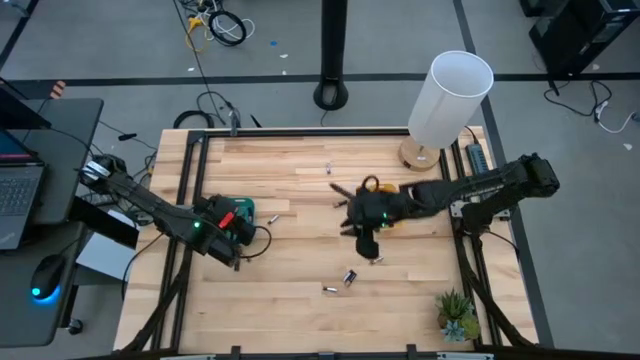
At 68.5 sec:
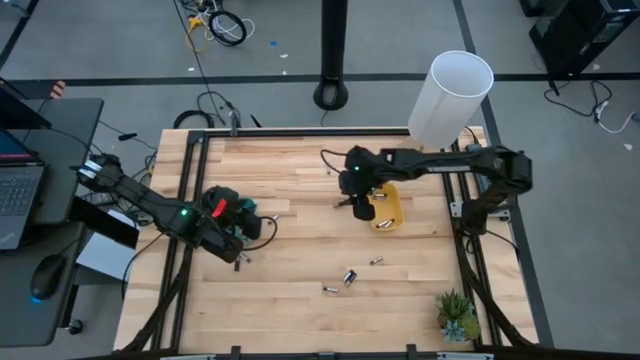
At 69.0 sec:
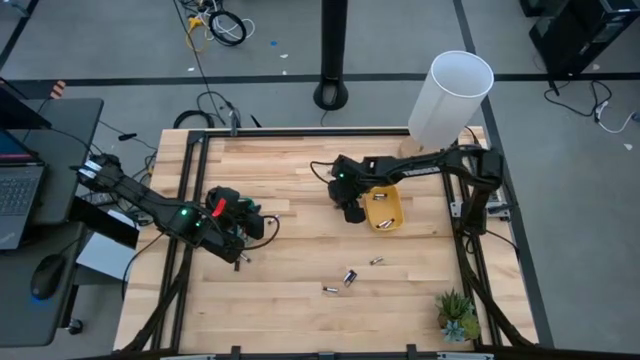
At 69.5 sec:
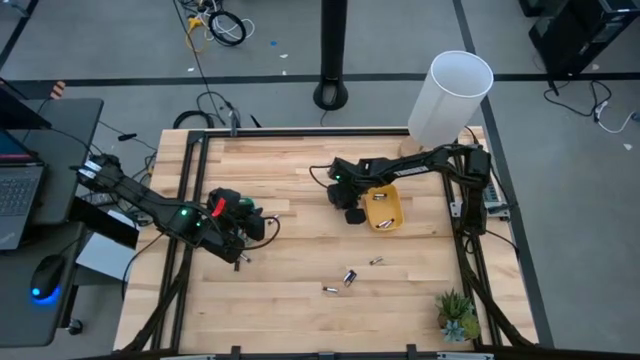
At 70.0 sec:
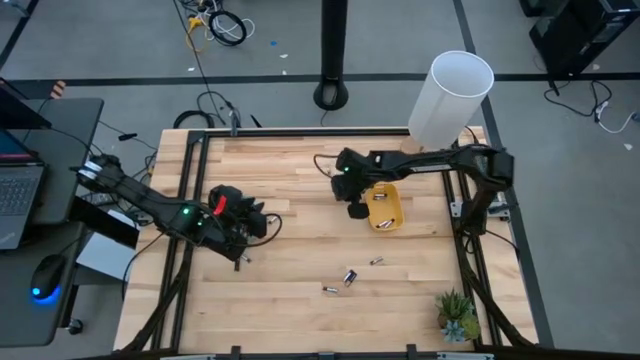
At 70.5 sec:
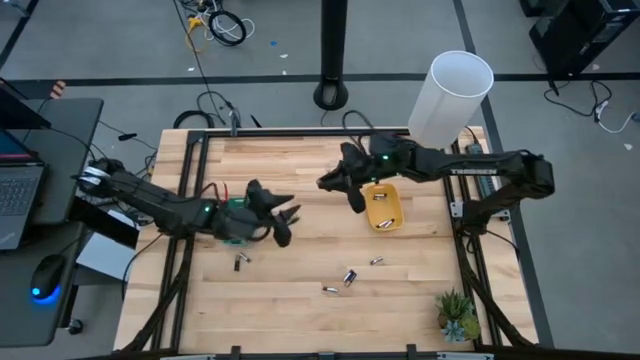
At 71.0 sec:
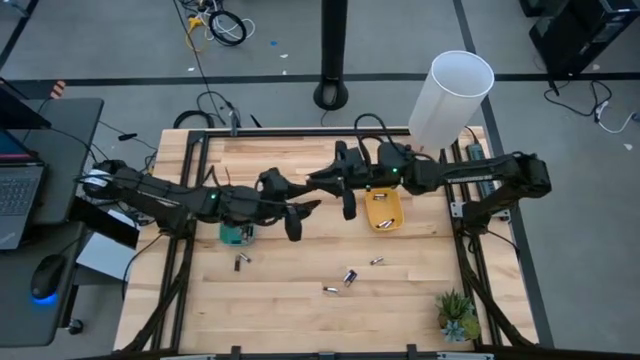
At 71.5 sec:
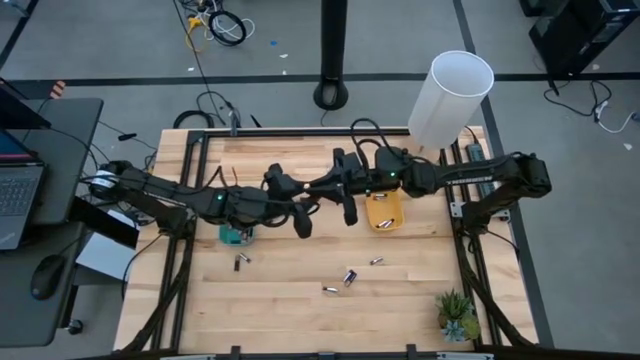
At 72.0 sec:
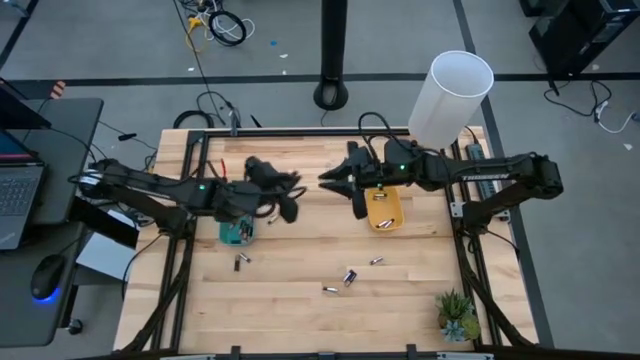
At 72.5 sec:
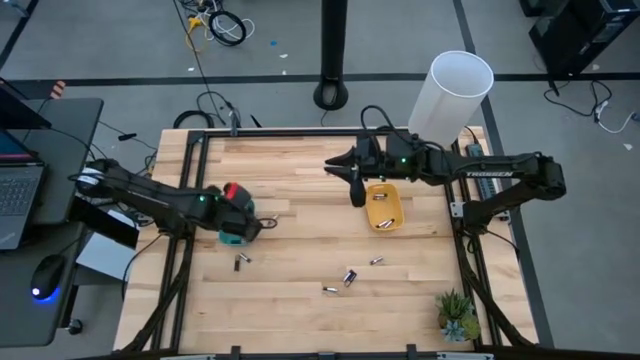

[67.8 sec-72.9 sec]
Task: Sort batteries
Put the black battery into the green bin

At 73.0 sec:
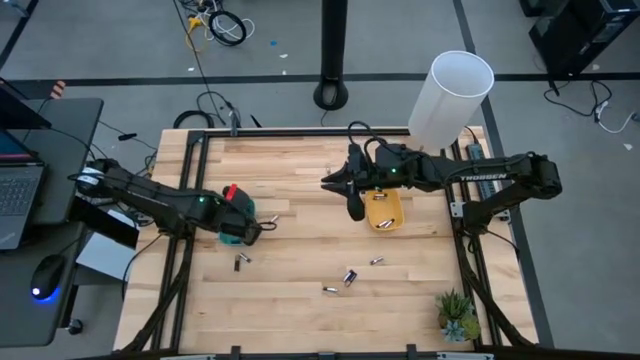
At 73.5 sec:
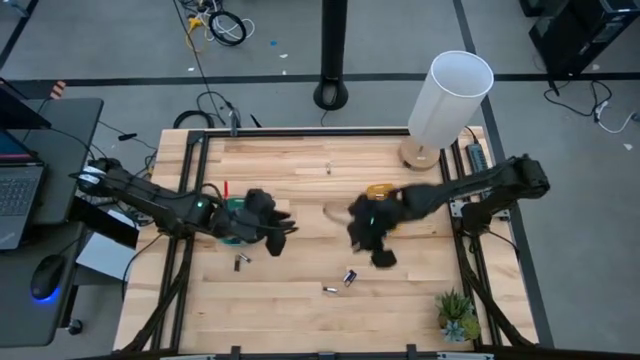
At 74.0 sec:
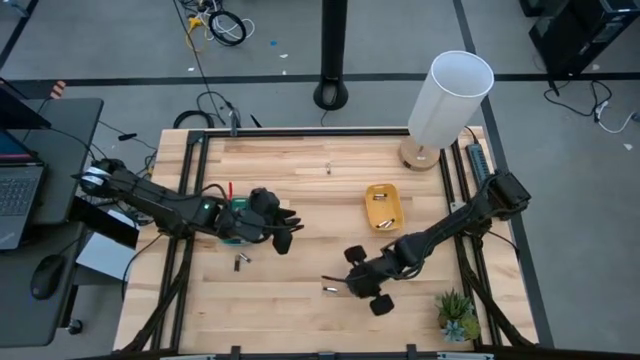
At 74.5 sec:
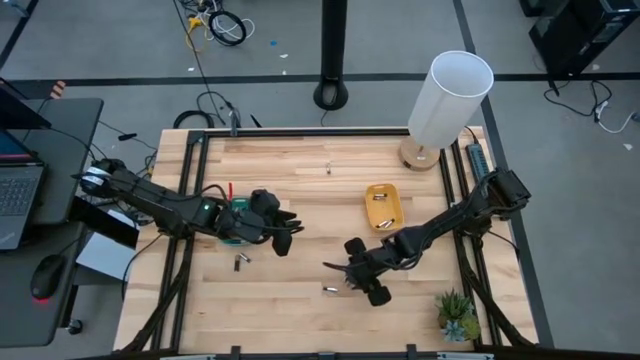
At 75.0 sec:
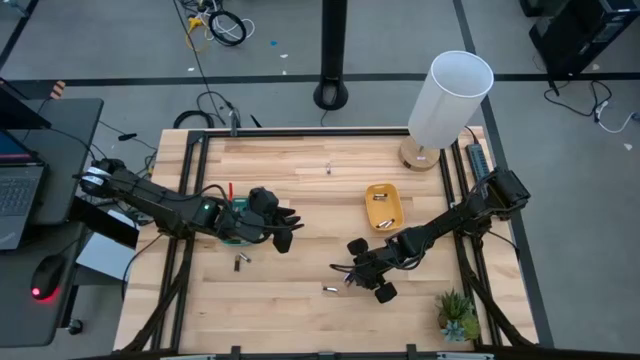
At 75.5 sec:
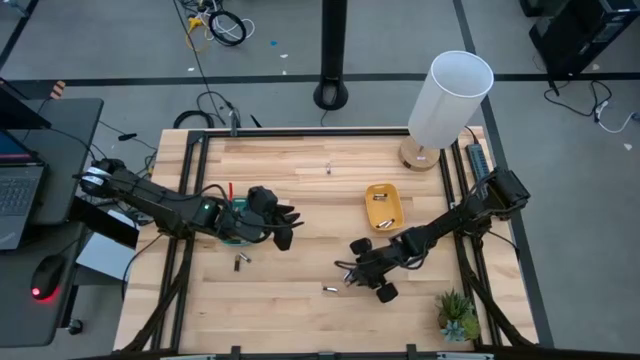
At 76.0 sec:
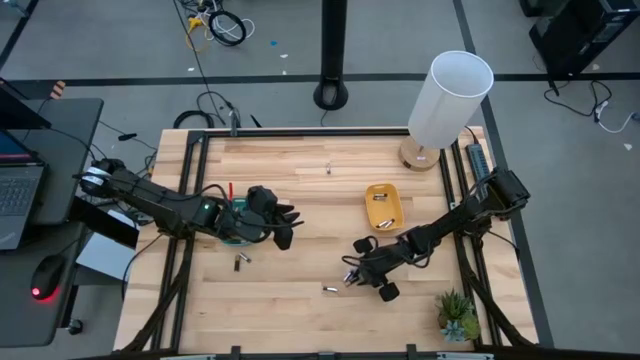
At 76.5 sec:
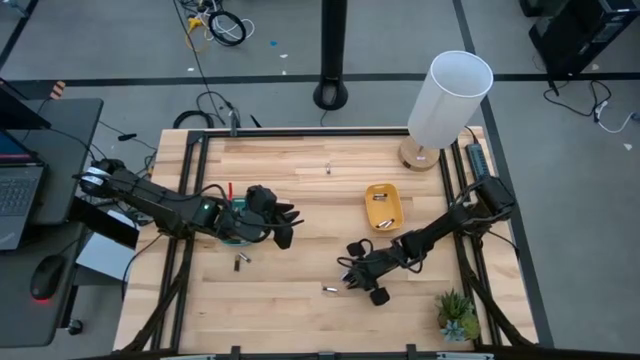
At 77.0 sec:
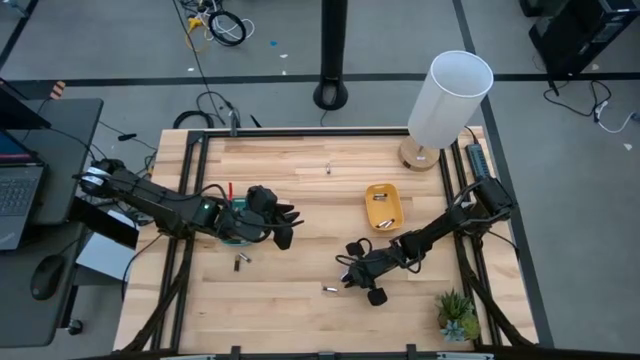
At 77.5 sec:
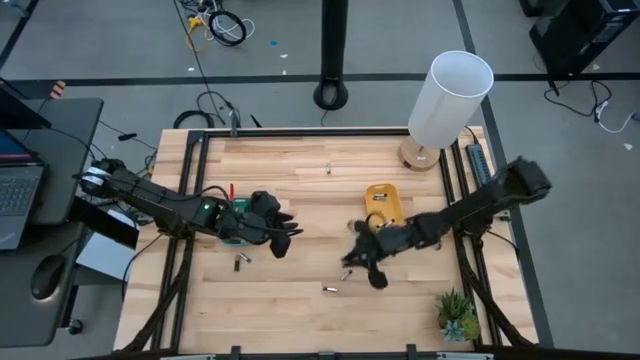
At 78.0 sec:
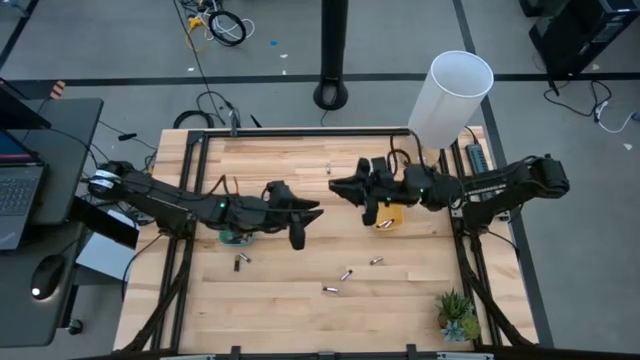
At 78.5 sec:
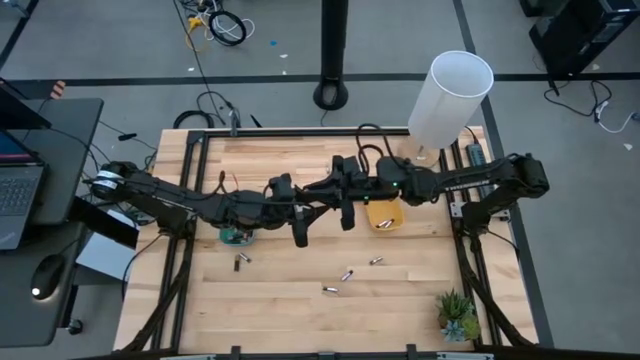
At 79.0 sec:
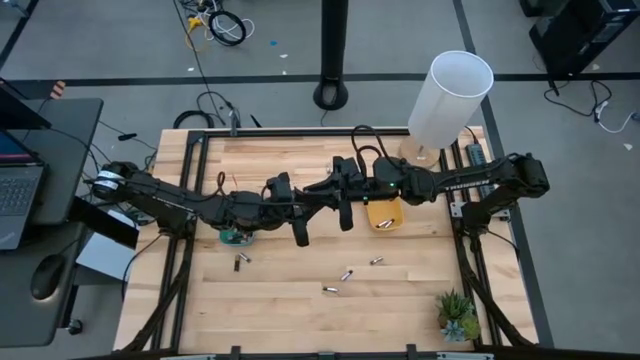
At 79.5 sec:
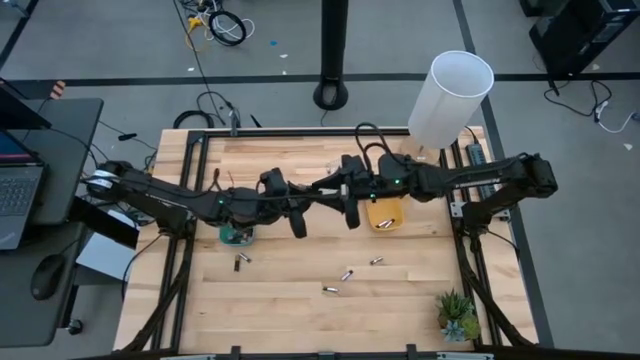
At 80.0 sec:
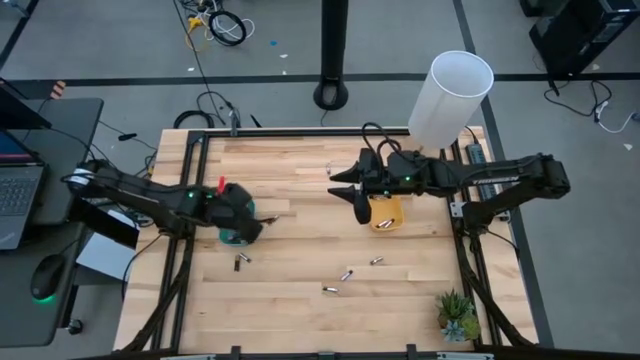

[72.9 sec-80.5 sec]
Put the black battery into the green bin

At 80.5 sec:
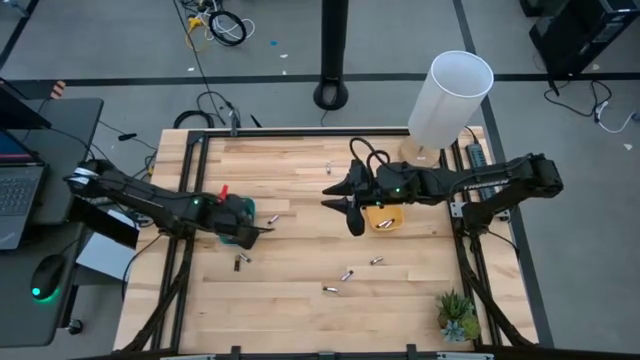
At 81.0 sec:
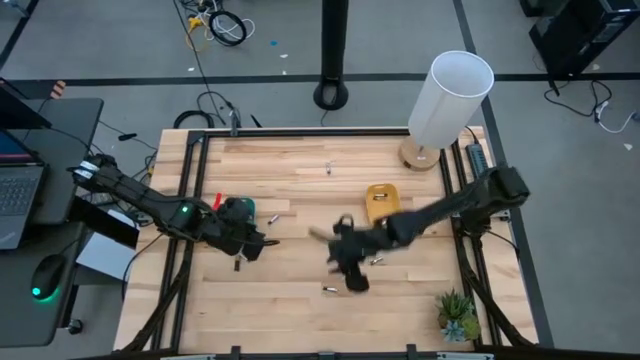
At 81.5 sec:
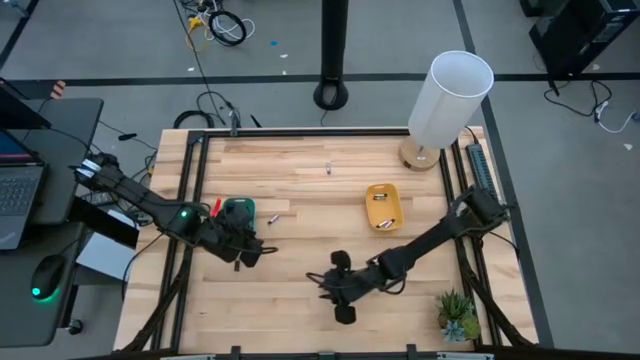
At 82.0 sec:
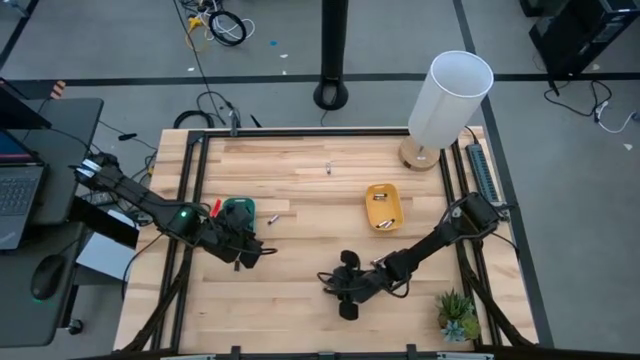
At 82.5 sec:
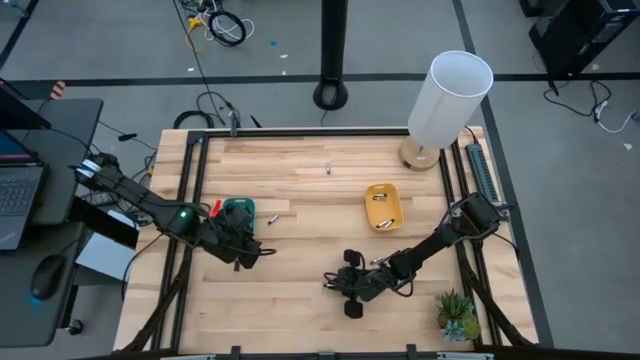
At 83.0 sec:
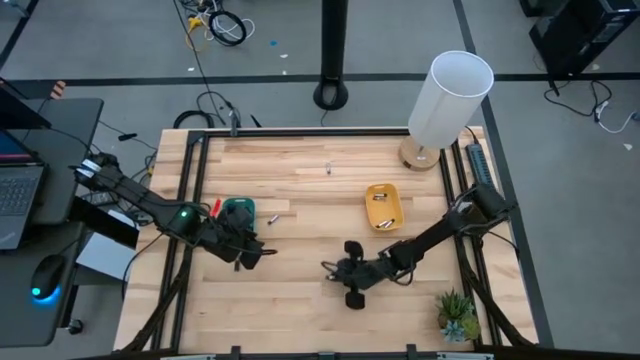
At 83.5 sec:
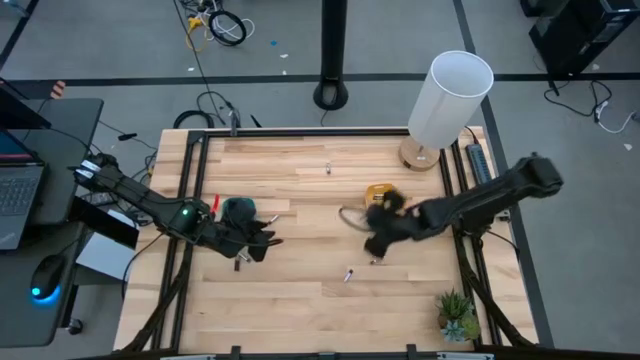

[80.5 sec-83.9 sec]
Put the silver battery into the yellow bin

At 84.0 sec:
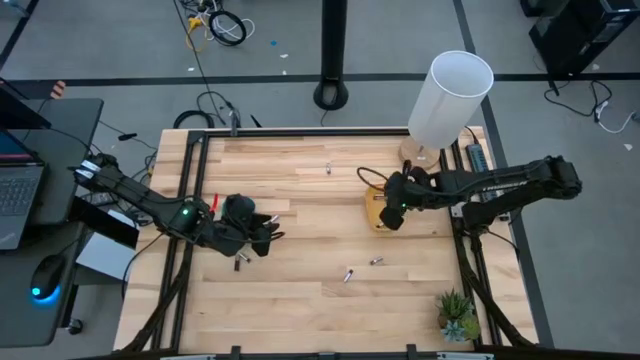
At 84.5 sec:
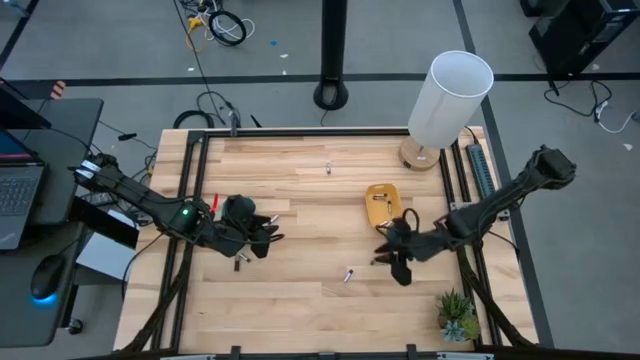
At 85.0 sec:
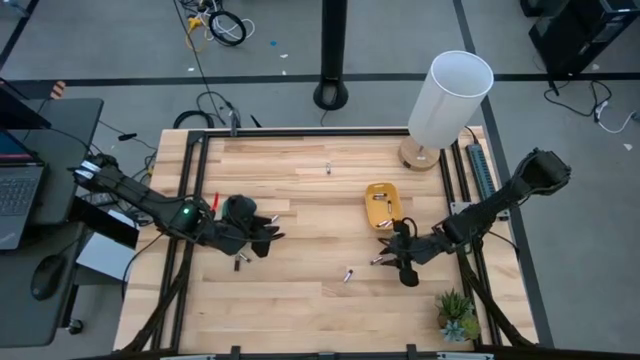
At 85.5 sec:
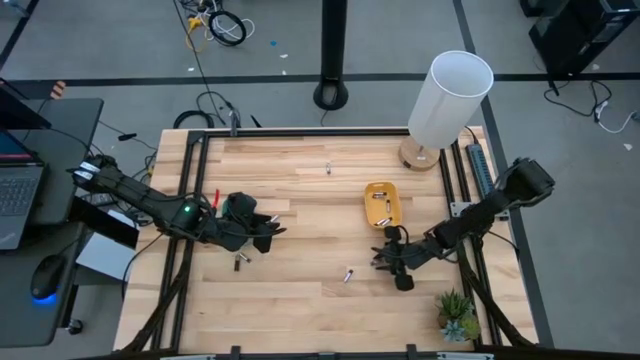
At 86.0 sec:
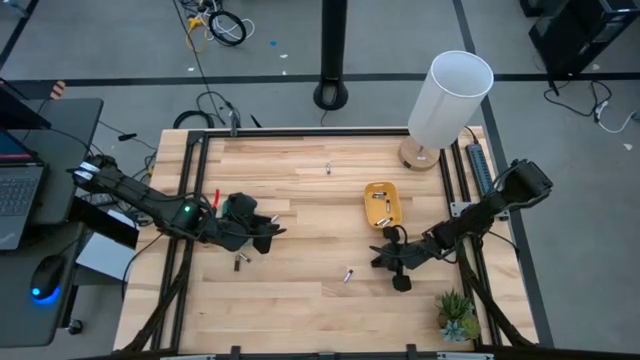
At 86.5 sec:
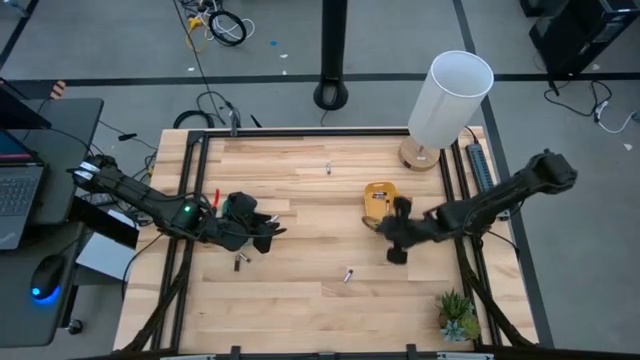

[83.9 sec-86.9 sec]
Put the silver battery into the yellow bin

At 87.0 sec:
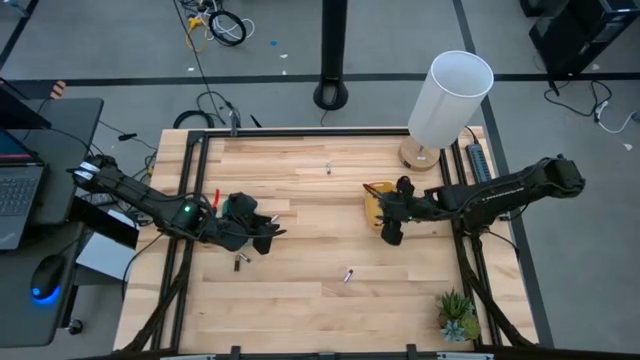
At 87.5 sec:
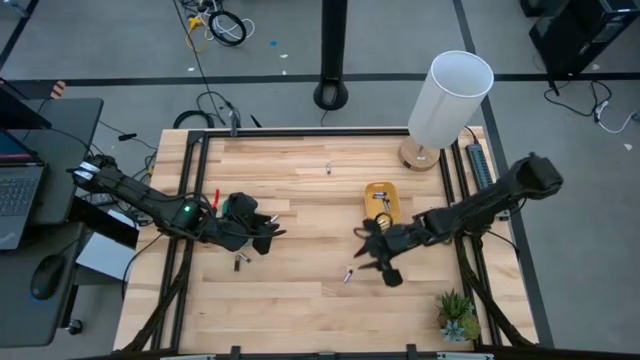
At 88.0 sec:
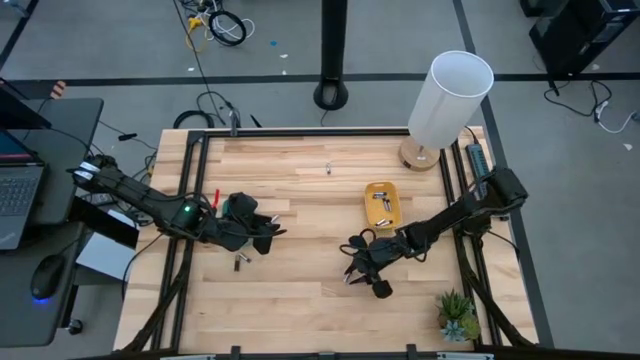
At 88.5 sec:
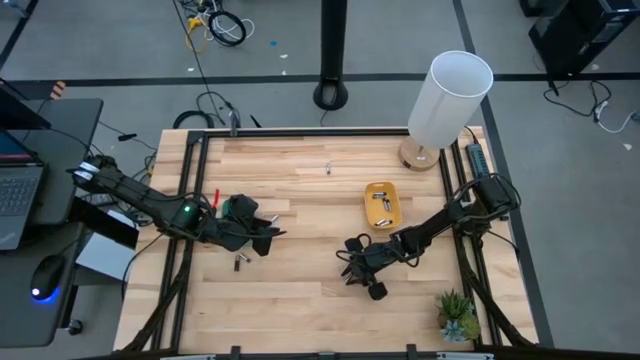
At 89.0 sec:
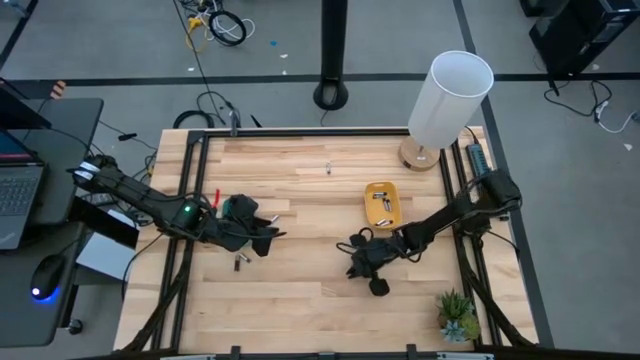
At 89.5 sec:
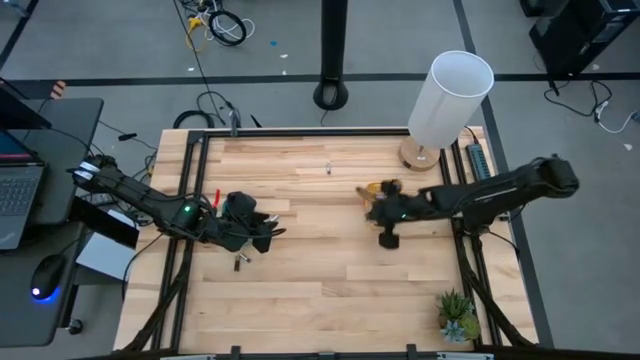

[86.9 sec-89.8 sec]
Put the silver battery into the yellow bin
